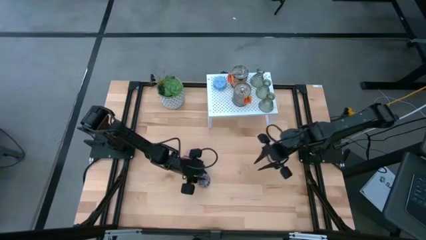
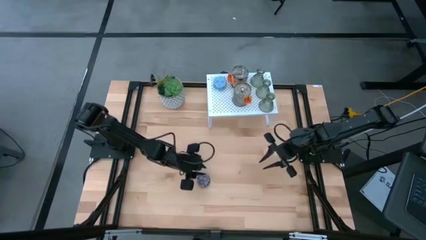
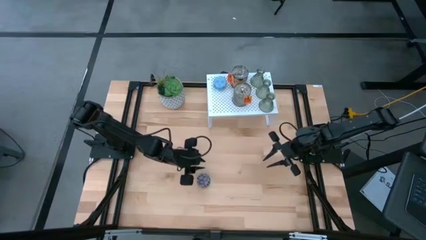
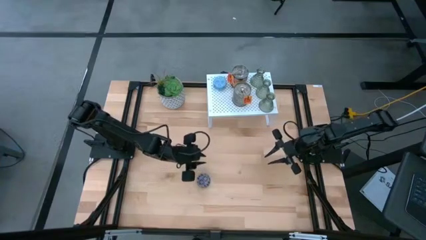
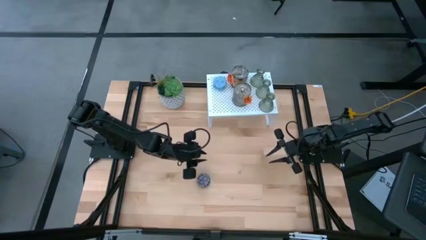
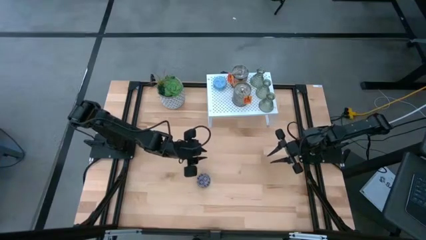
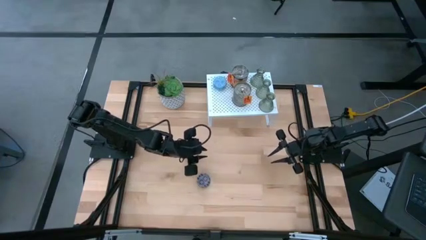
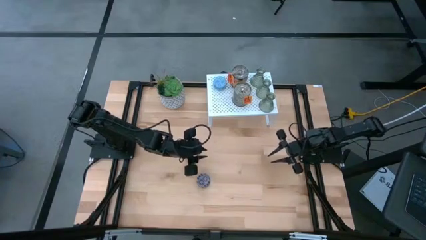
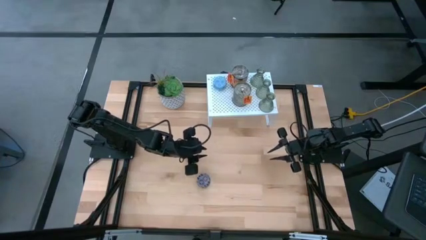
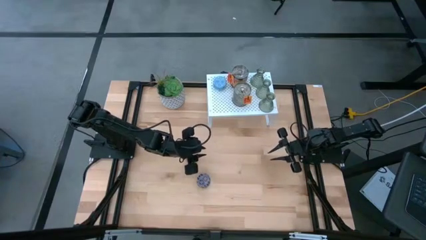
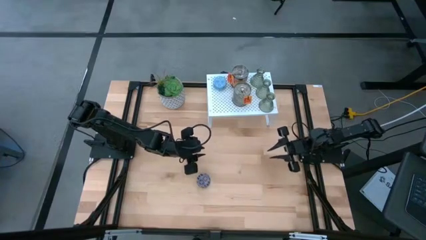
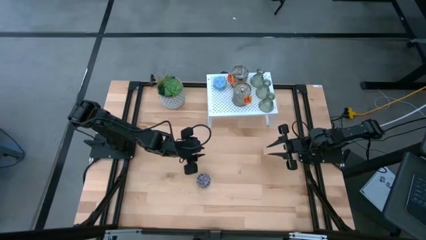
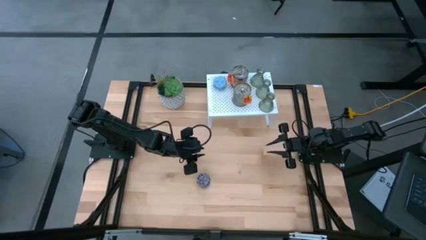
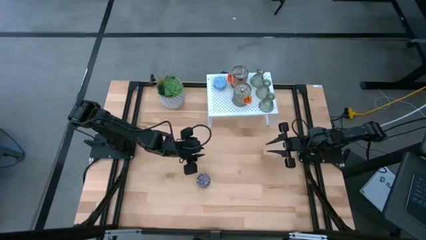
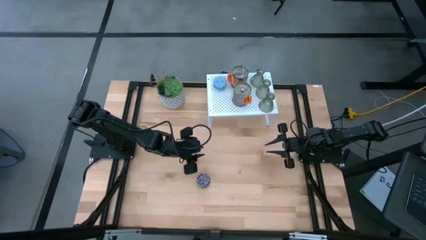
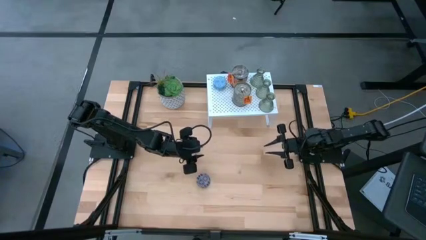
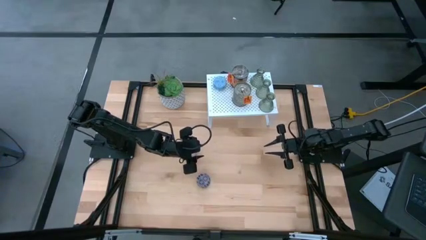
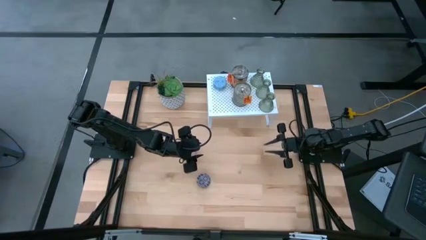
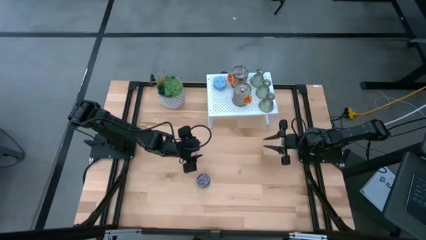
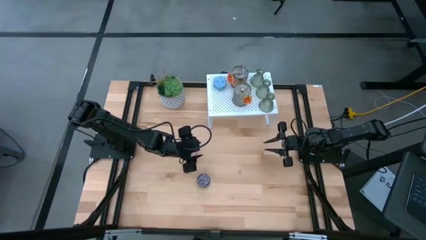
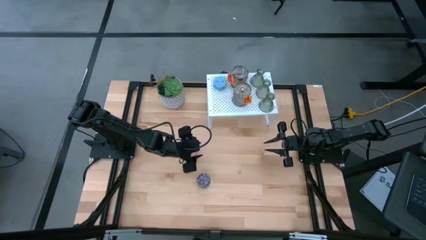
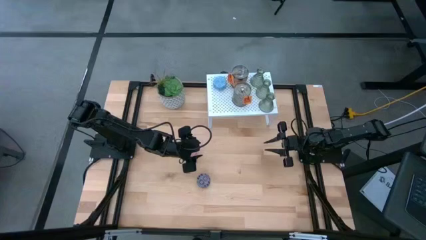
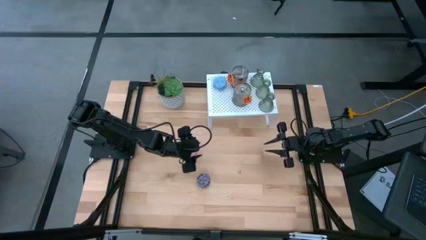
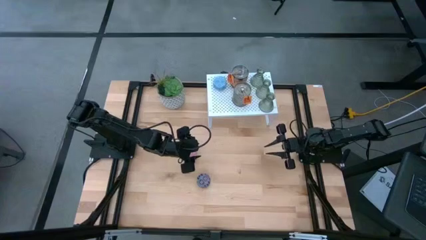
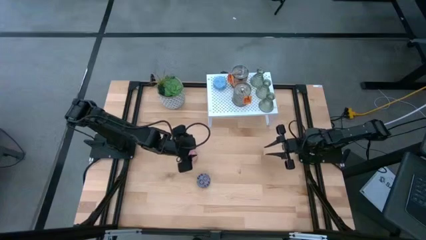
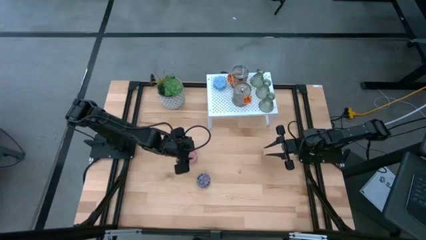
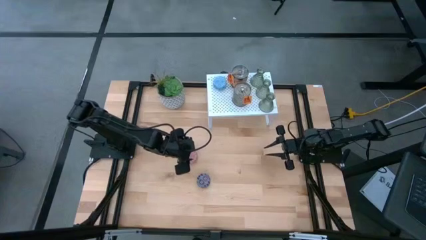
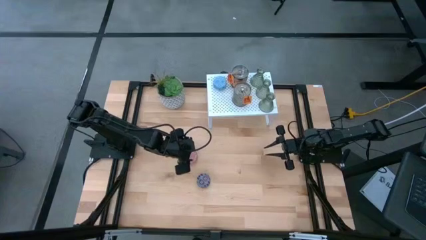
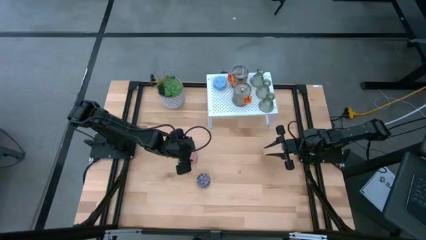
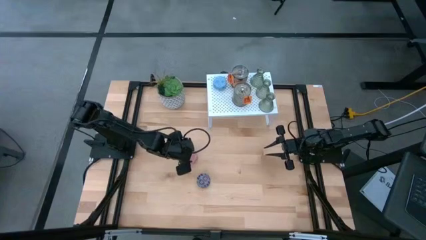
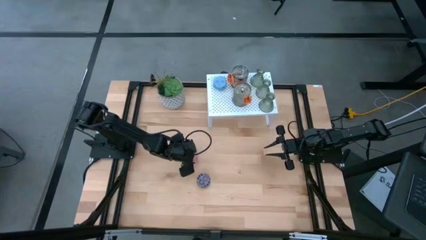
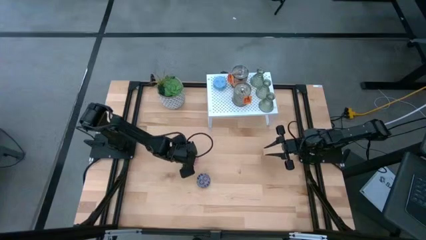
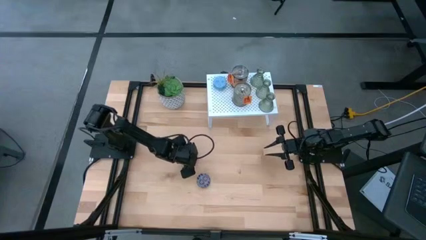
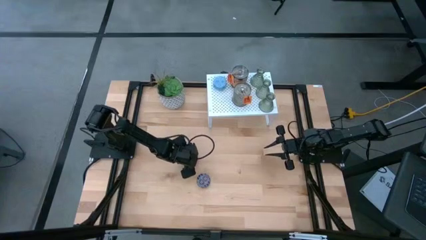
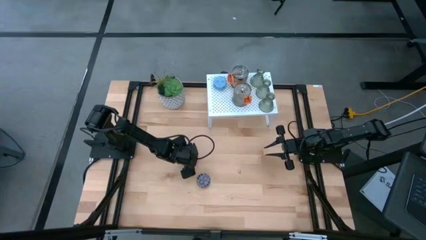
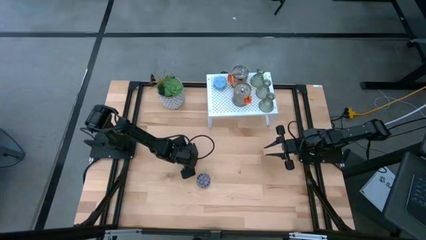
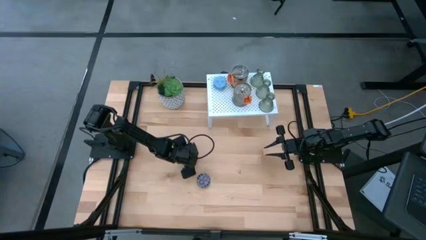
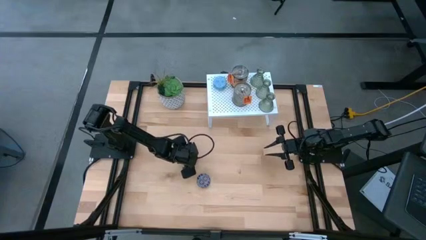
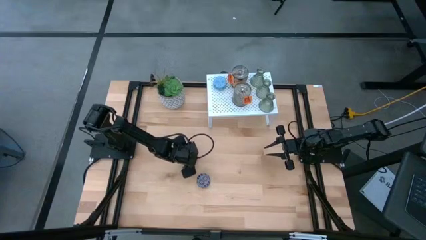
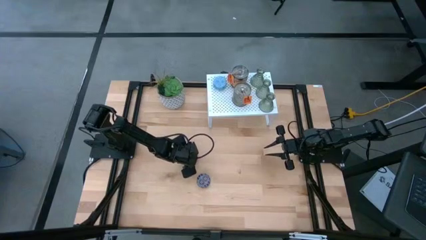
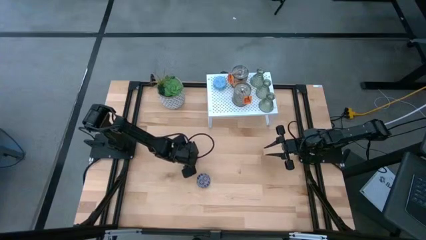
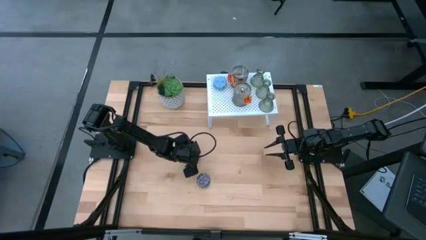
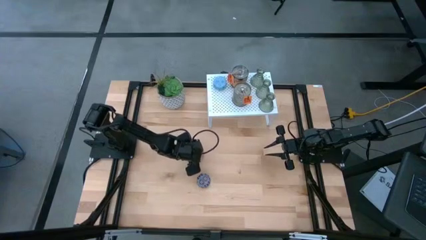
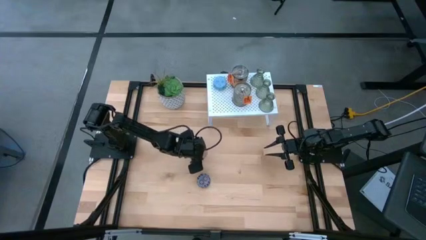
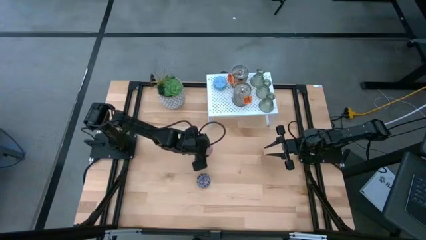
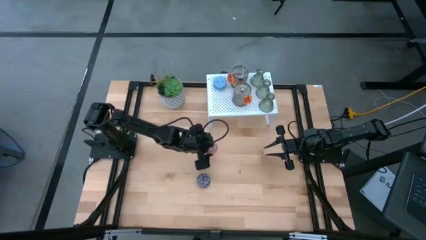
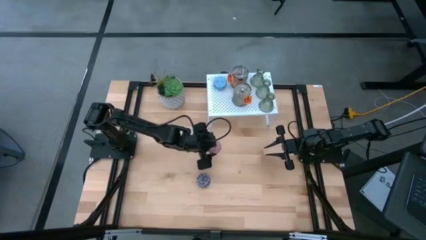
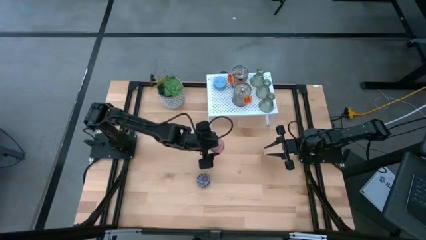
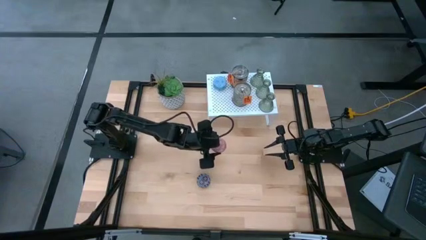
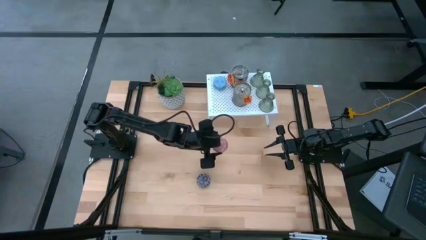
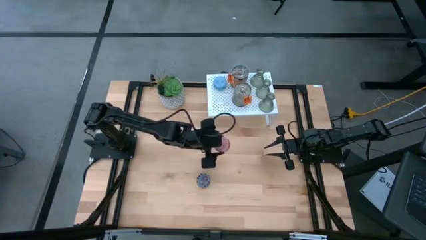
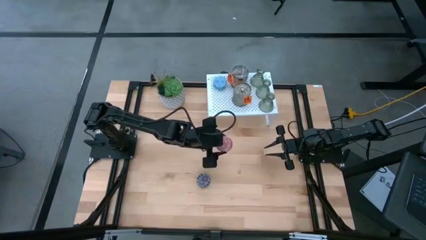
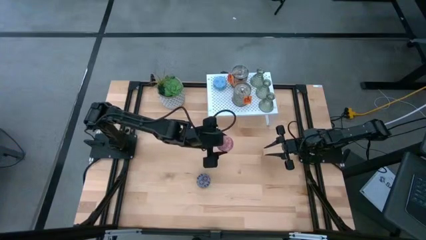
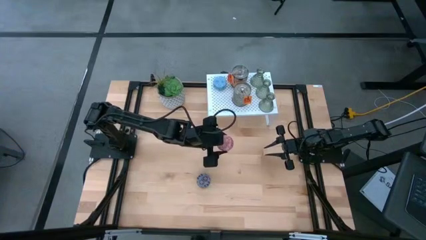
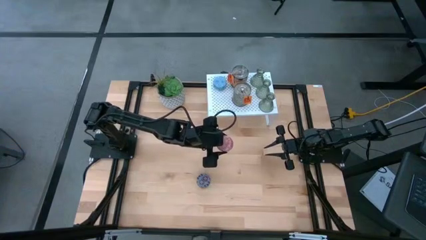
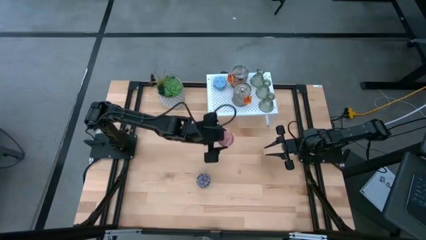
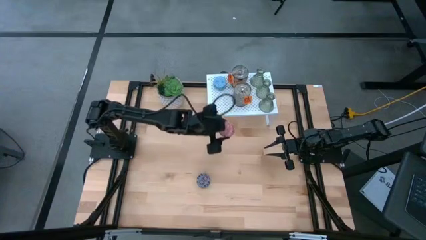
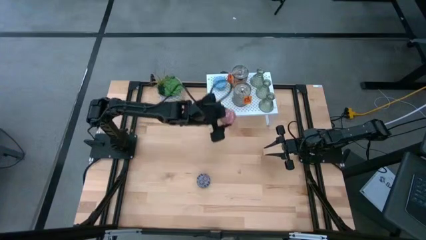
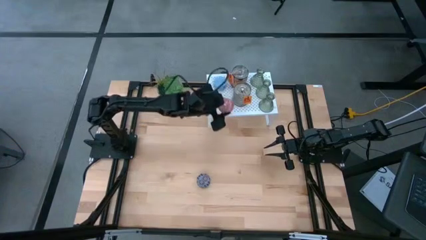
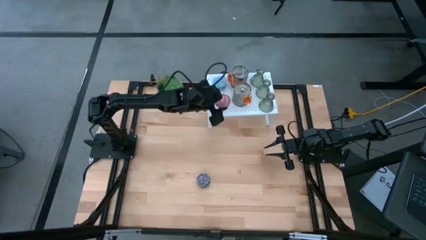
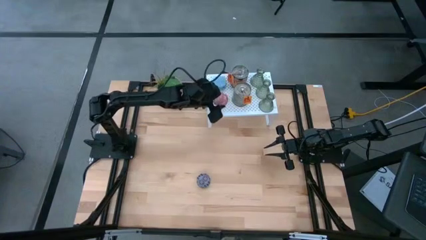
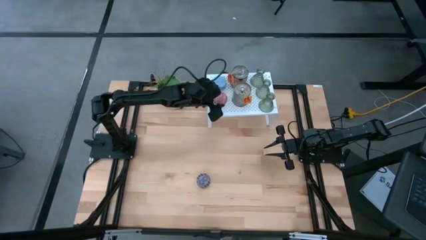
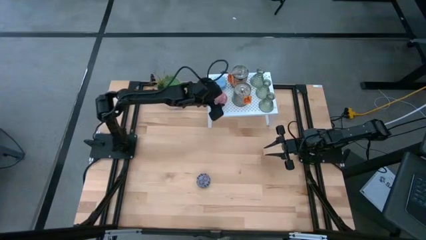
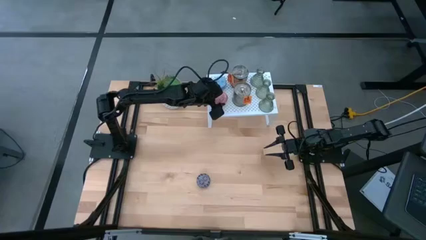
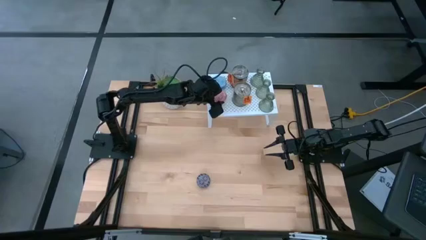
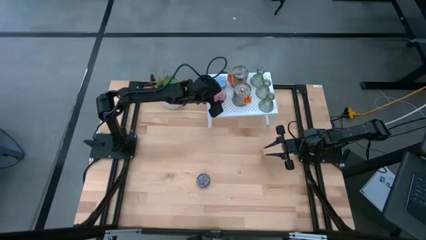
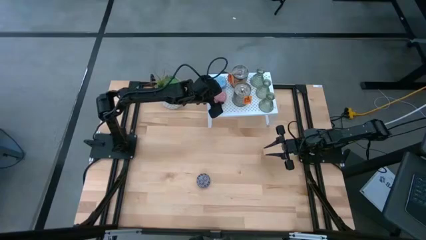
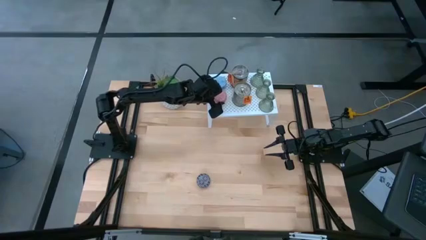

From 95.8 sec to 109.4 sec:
Task: Pick & Place candle stick holders
Put the pink scented candle on the shelf aligned with the blue scented candle
